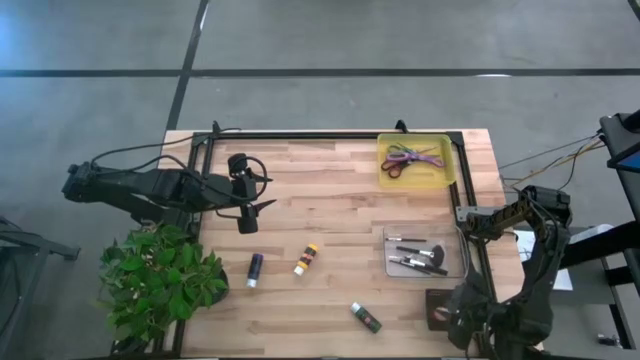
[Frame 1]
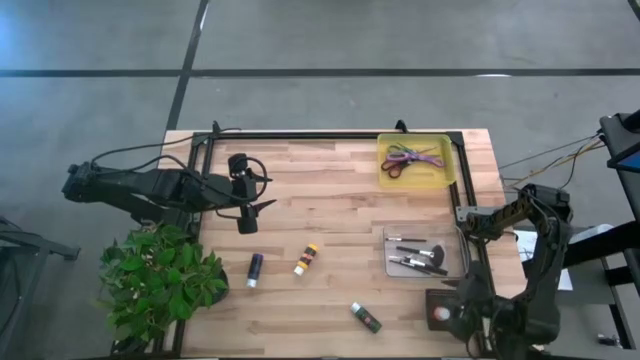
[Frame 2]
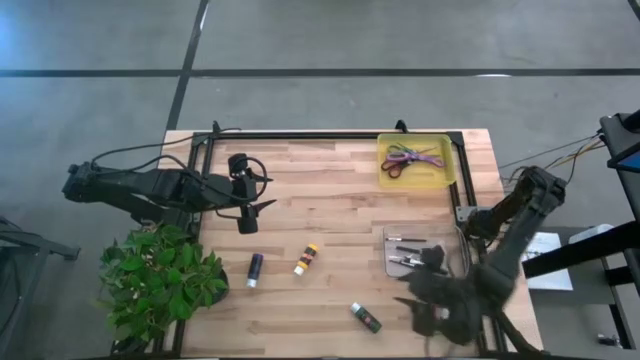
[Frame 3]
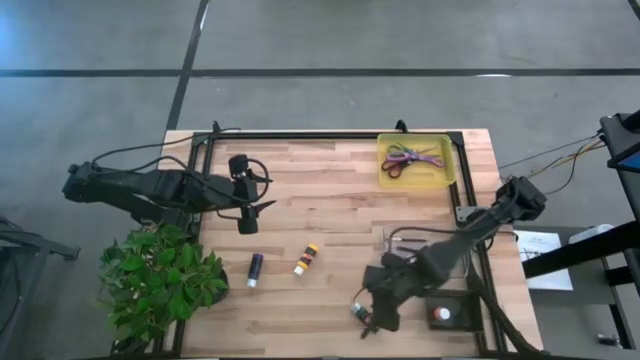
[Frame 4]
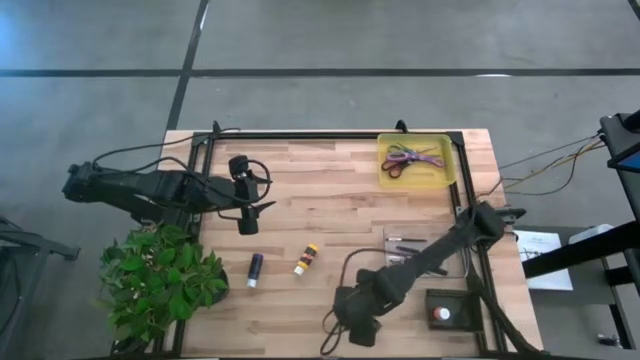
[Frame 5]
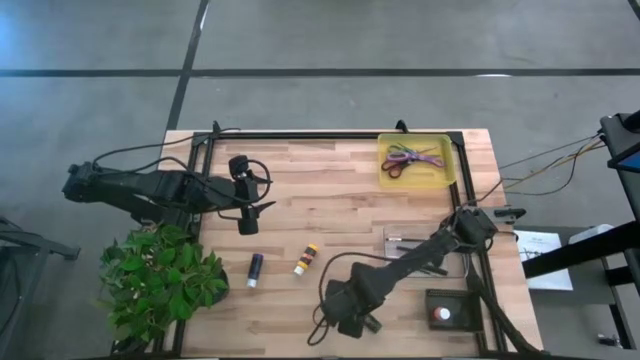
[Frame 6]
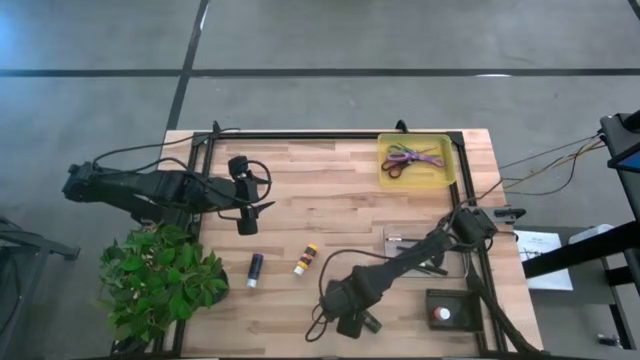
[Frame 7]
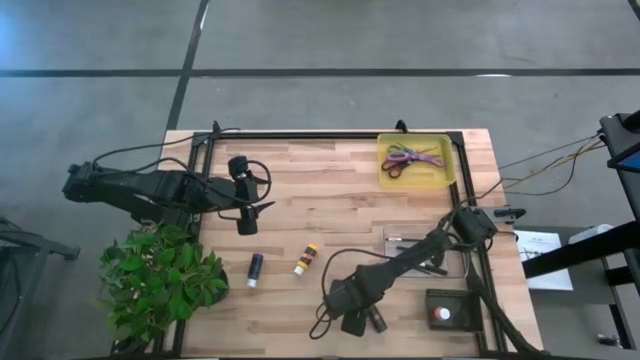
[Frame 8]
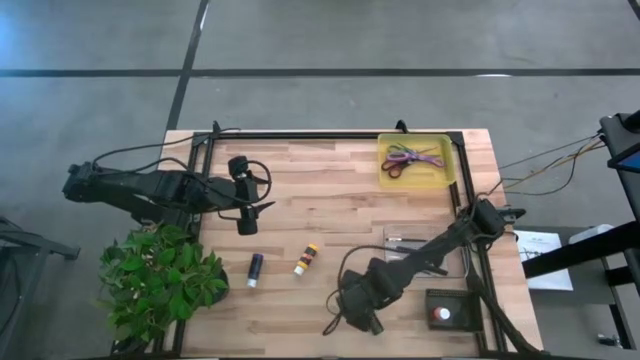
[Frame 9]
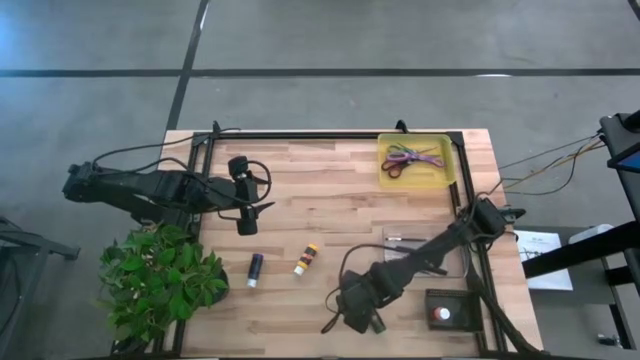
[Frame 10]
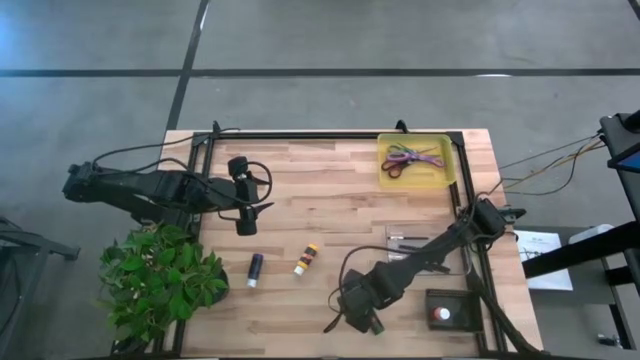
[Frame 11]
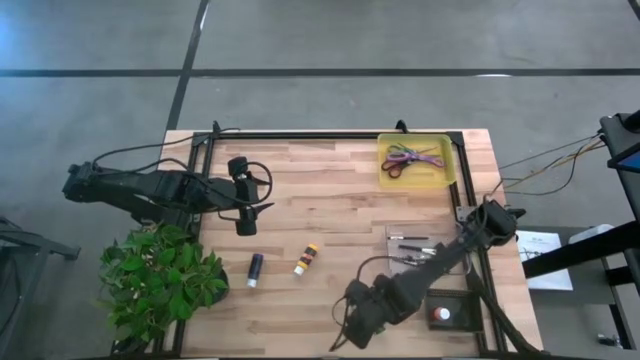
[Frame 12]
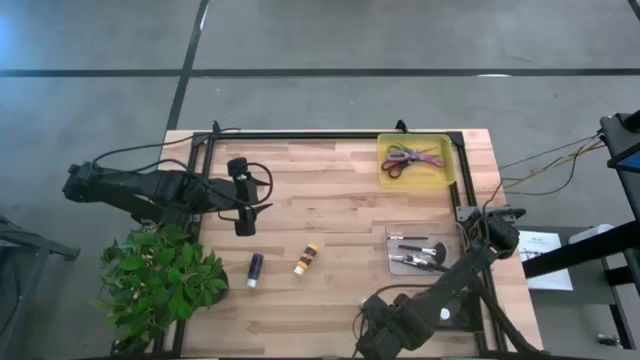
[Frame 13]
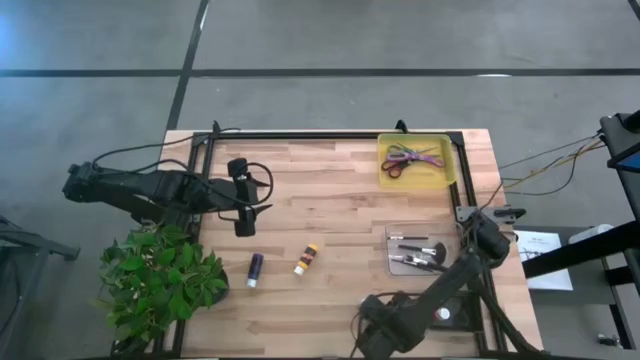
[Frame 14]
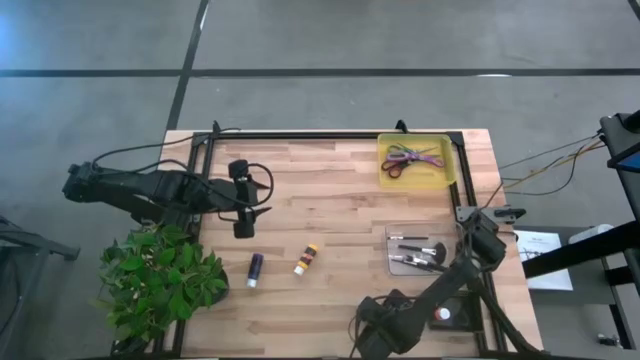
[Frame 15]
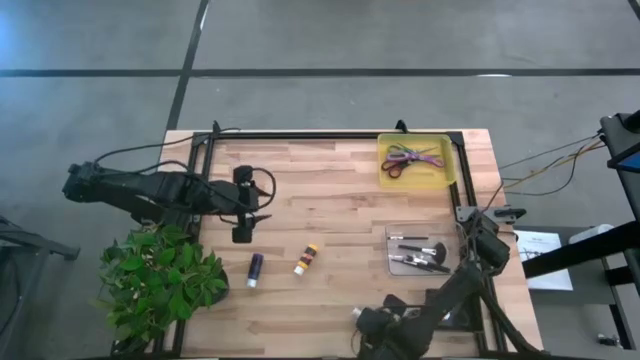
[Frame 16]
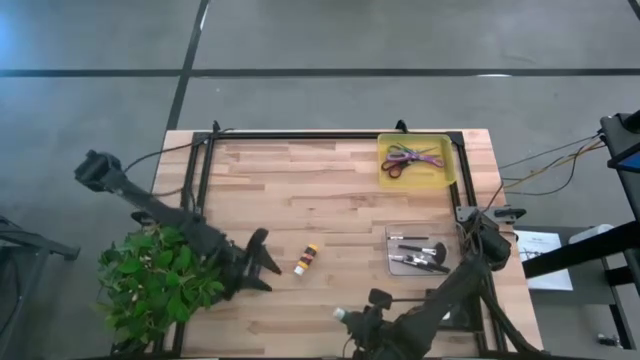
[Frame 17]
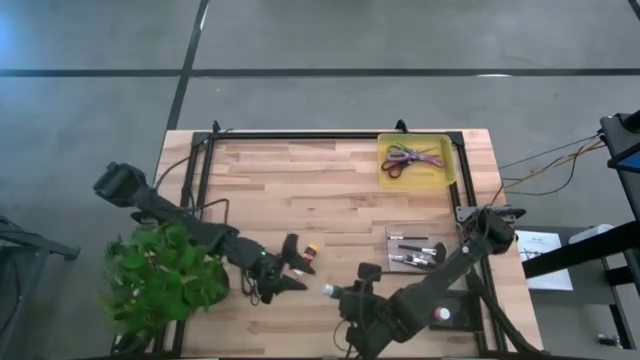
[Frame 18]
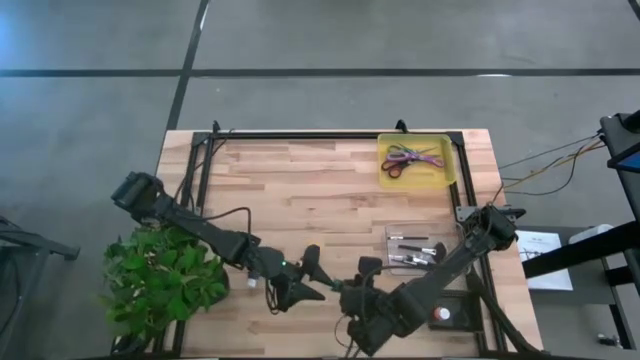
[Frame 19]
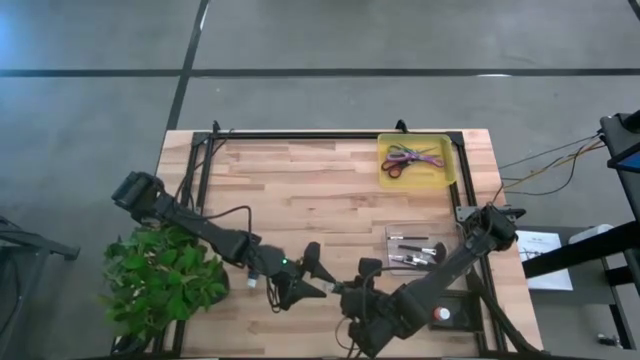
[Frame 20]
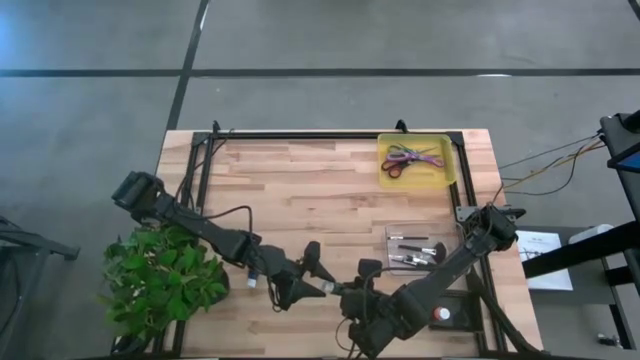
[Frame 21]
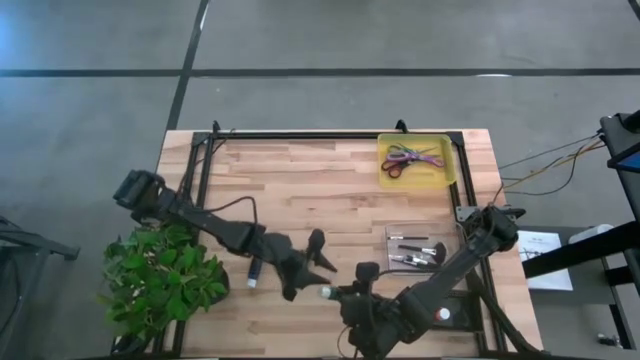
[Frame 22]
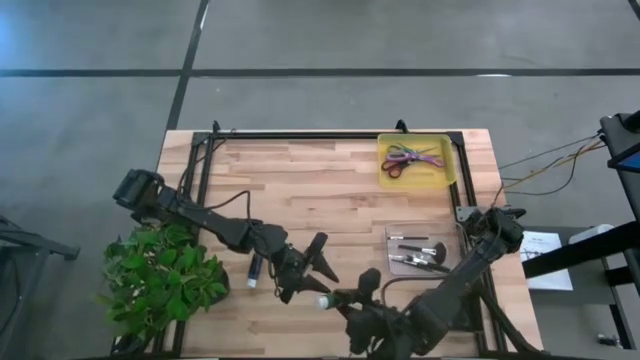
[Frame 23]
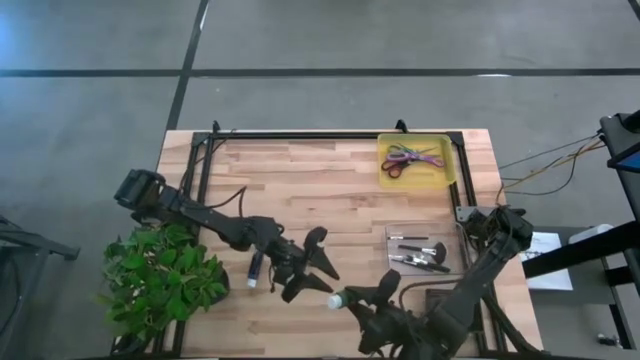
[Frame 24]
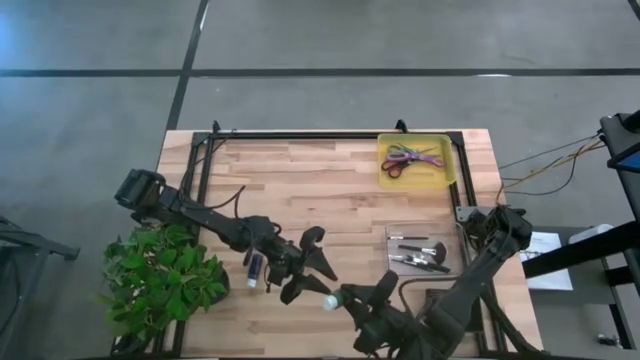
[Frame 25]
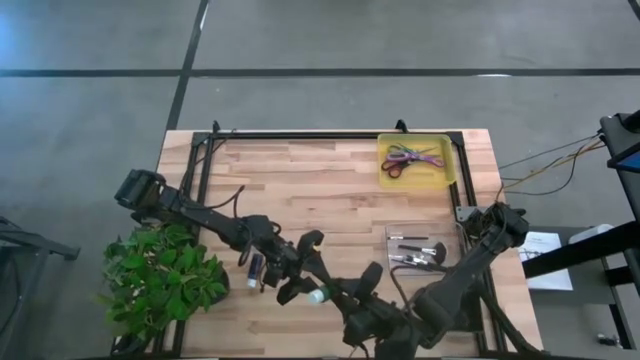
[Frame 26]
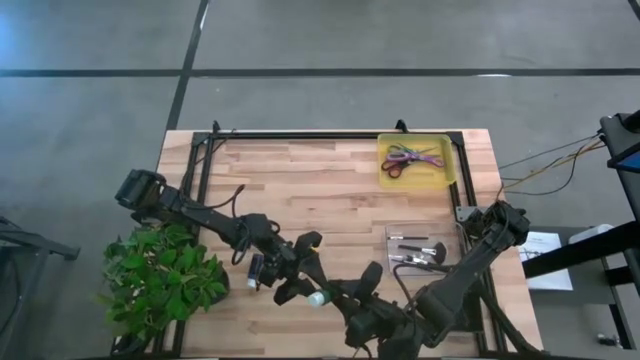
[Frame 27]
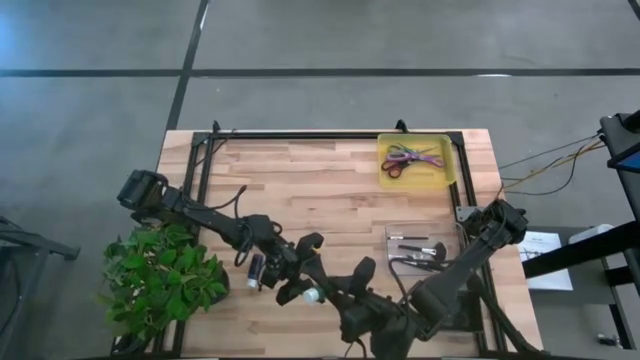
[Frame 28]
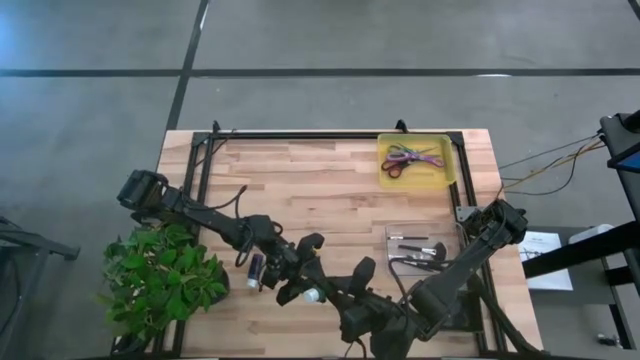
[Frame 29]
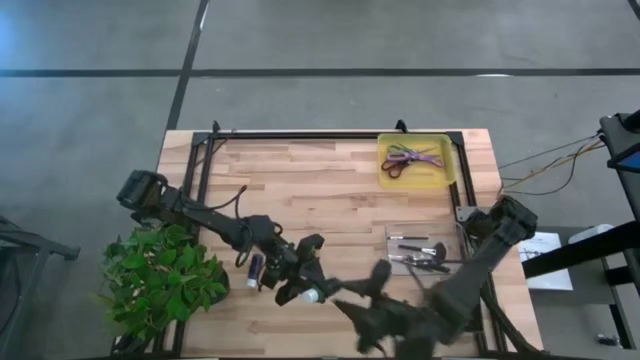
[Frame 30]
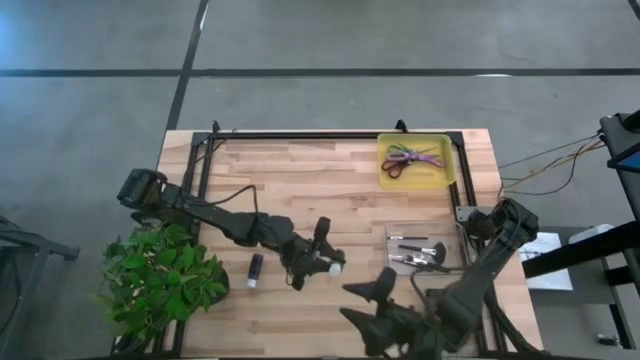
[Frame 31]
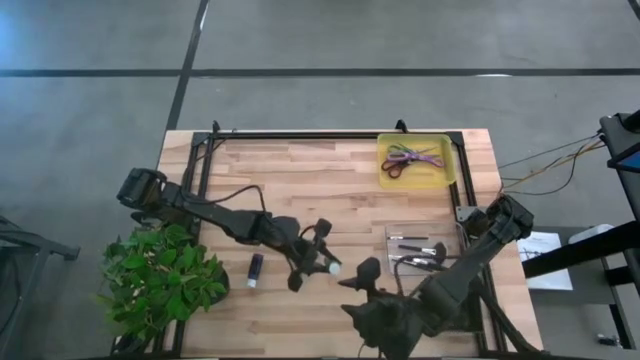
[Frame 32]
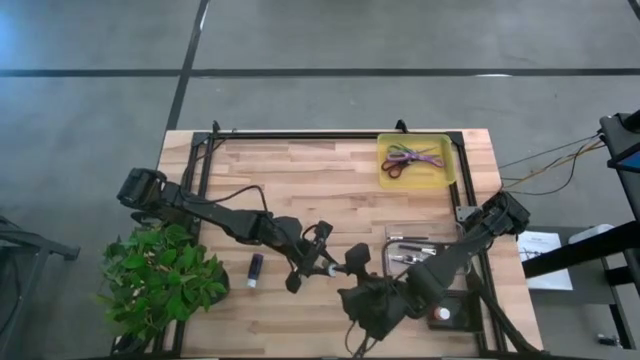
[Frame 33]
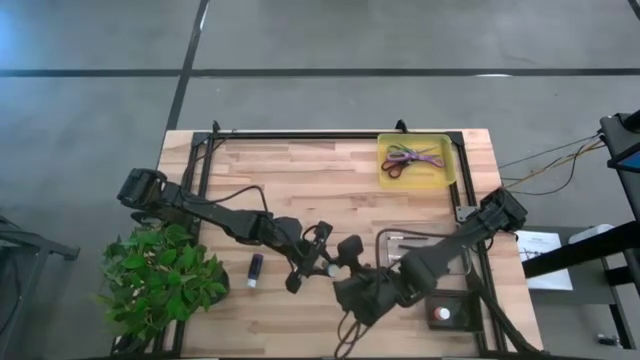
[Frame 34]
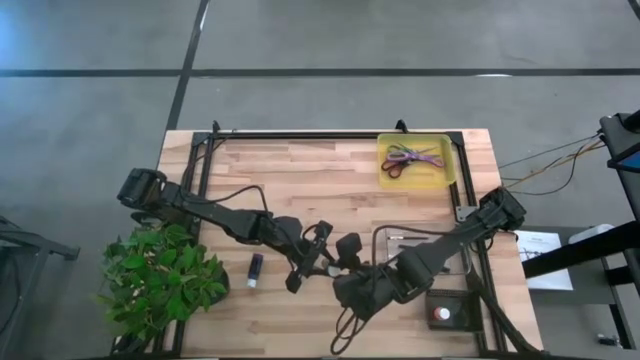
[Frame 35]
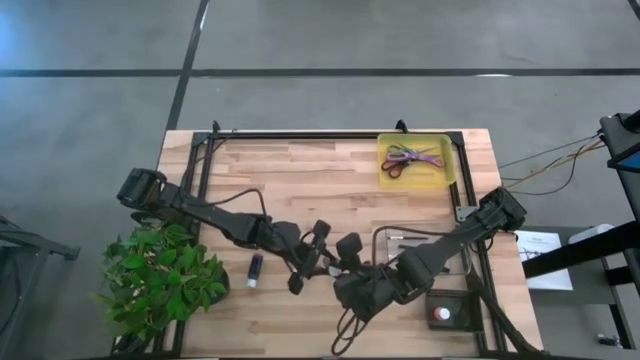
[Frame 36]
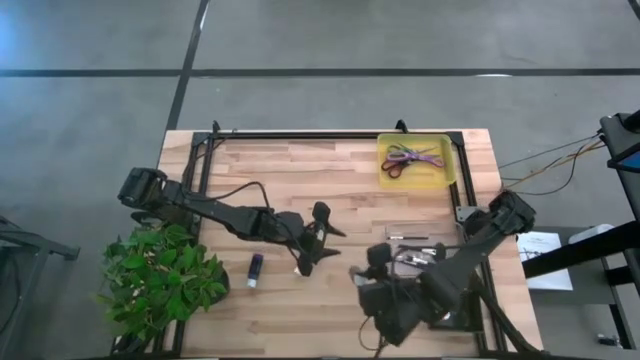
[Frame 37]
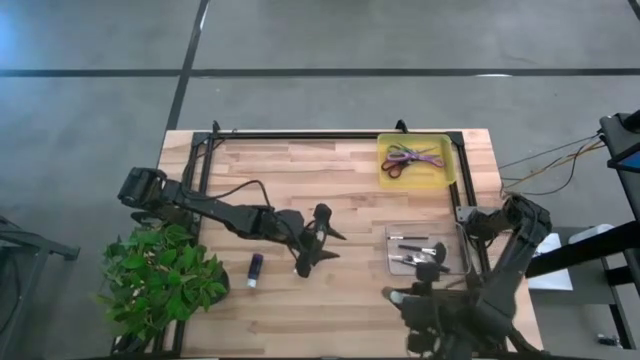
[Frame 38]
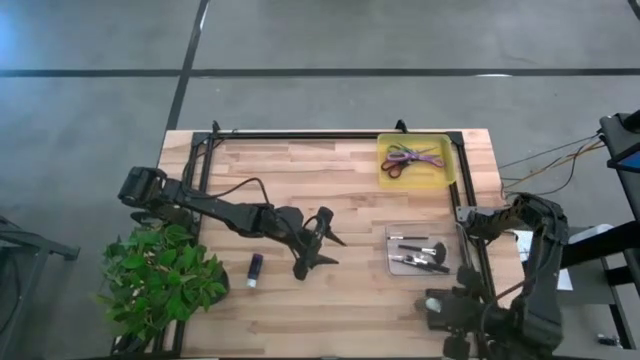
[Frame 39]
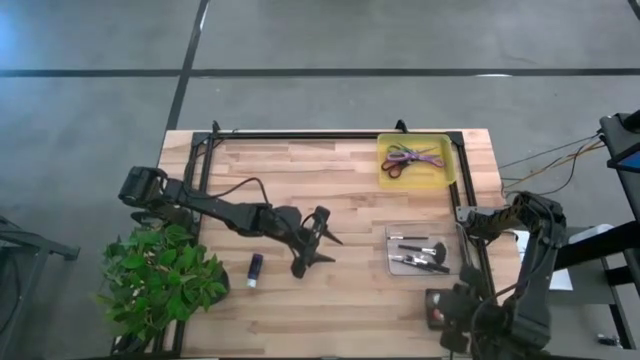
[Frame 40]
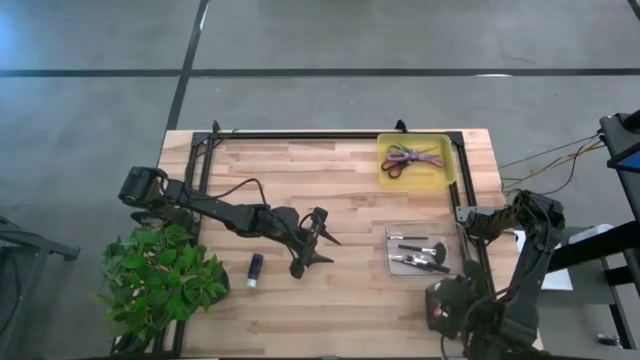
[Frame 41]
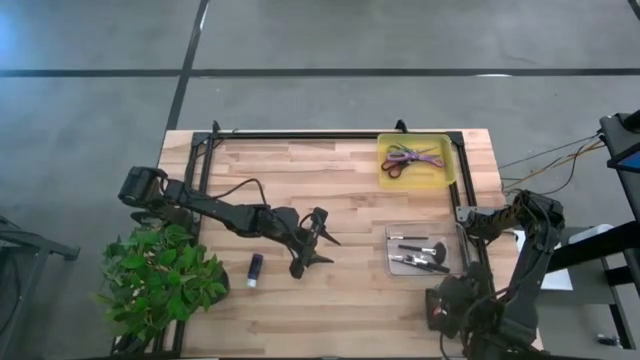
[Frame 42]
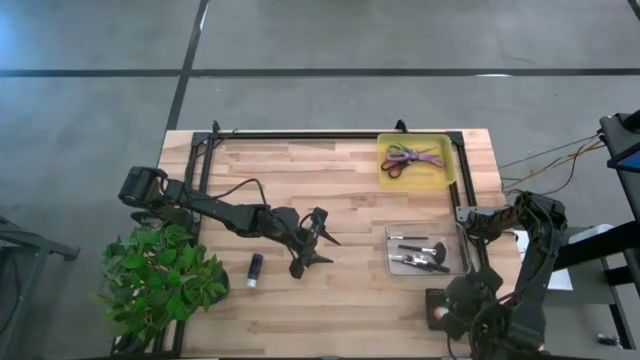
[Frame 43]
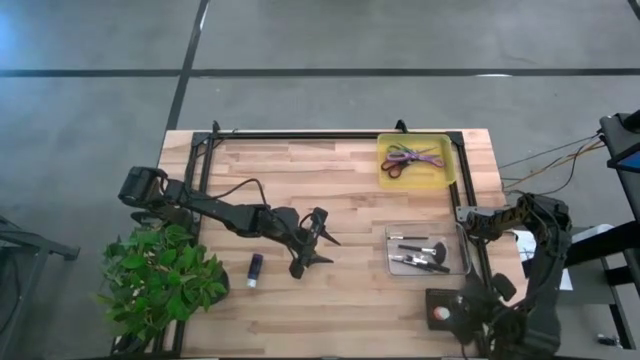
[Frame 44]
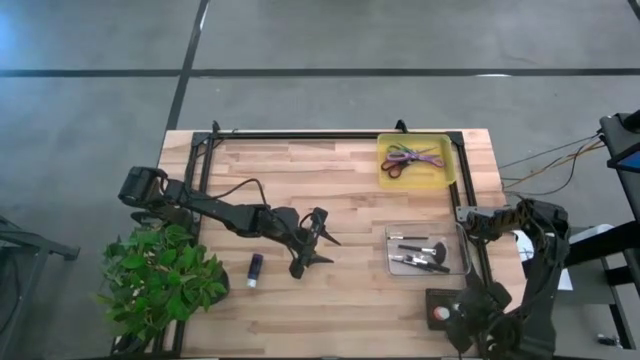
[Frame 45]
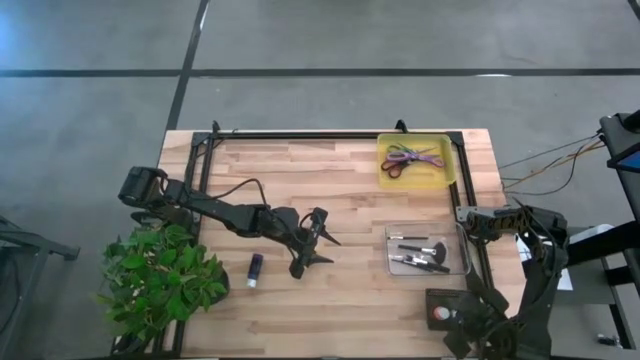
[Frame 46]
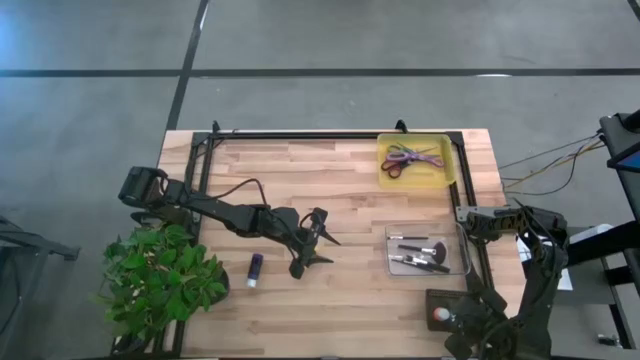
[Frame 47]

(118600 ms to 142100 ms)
Task: Pick & Place Paint Supplies
Put the green acrylic paint bottle into the black bin
